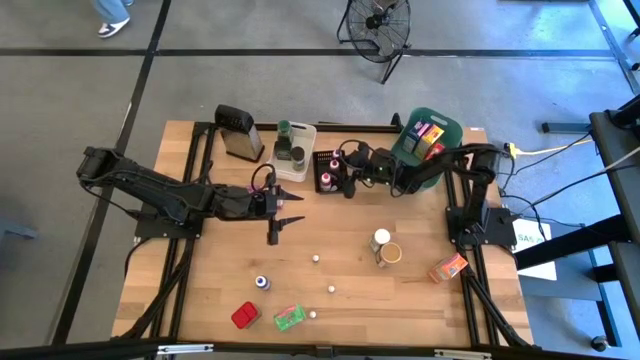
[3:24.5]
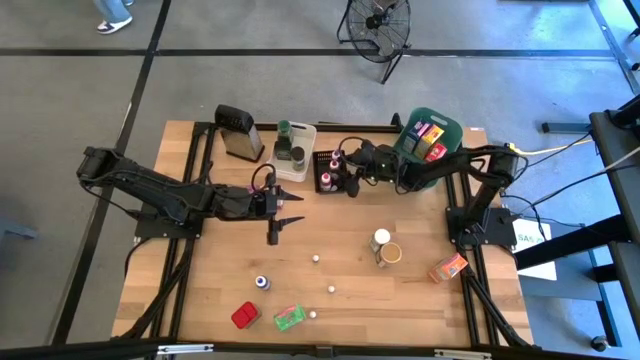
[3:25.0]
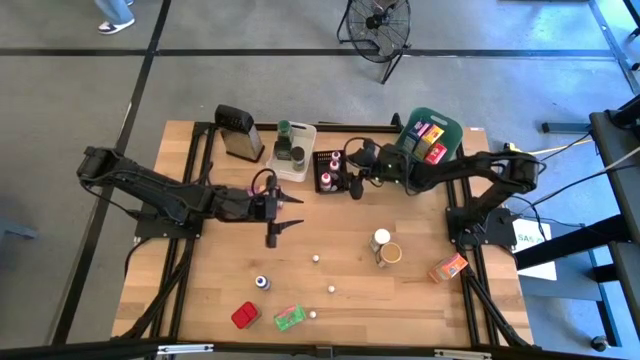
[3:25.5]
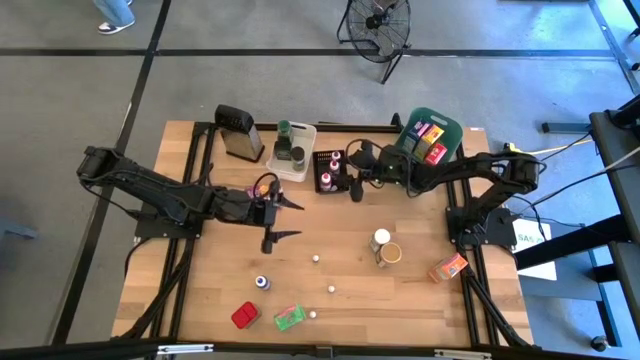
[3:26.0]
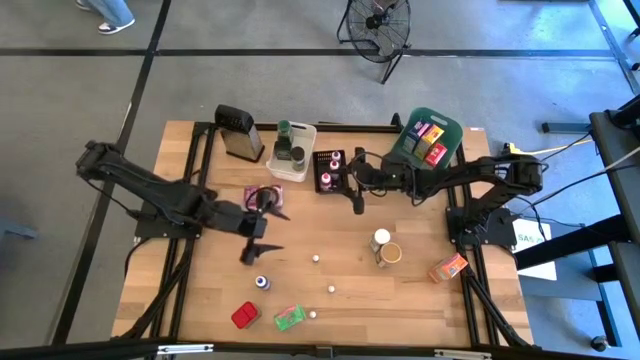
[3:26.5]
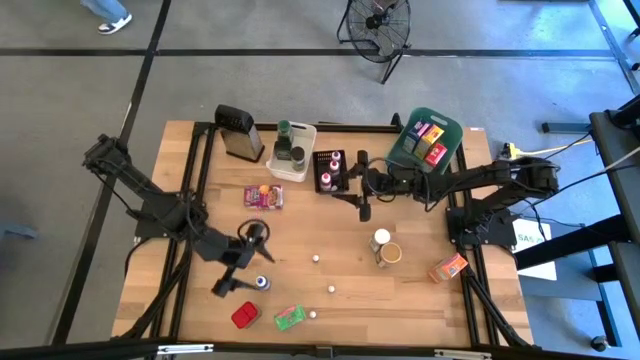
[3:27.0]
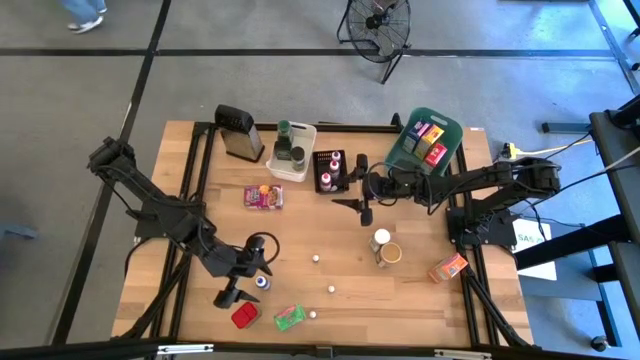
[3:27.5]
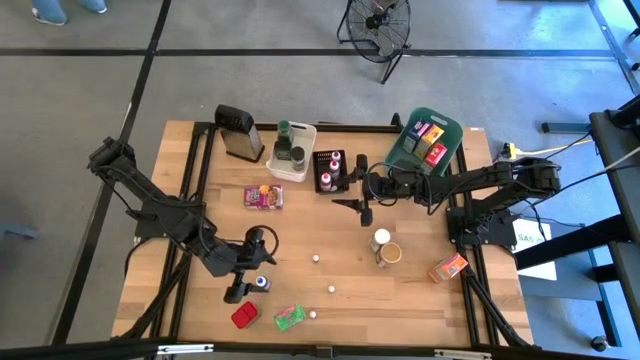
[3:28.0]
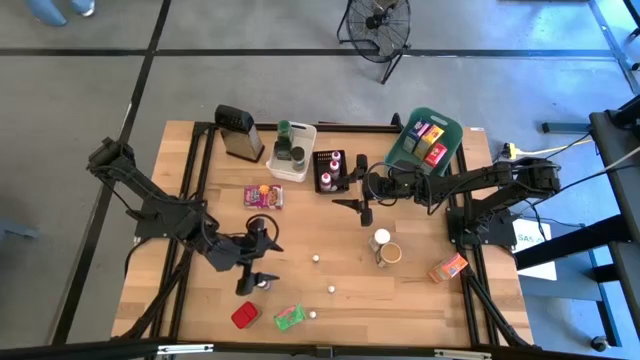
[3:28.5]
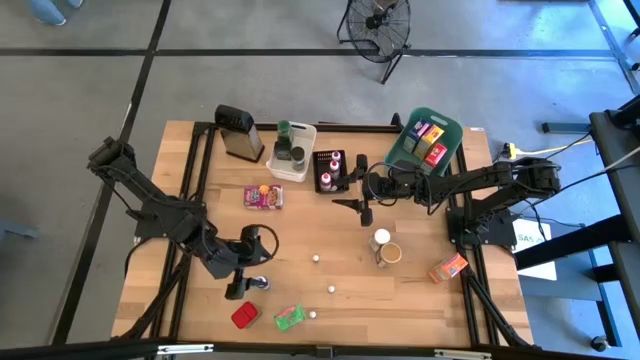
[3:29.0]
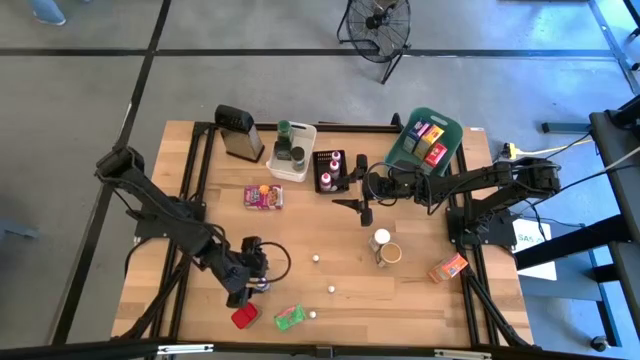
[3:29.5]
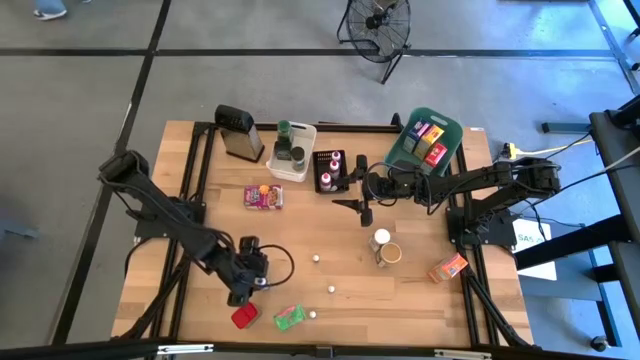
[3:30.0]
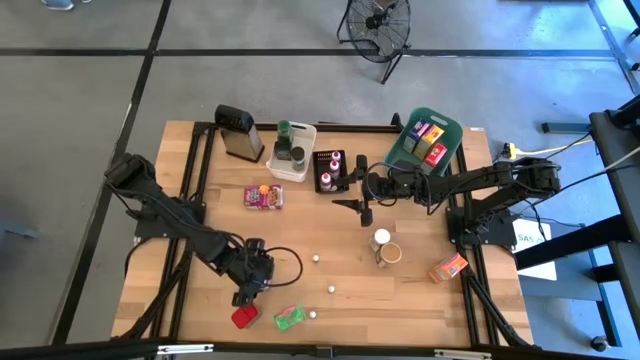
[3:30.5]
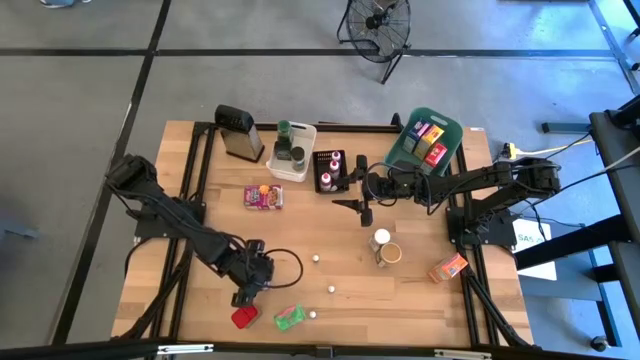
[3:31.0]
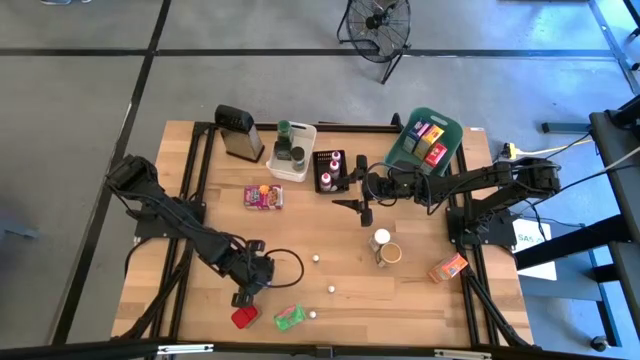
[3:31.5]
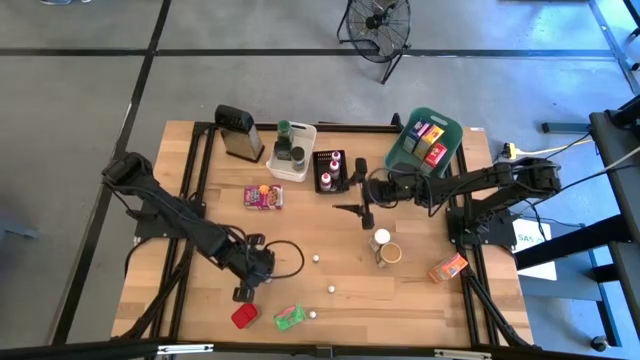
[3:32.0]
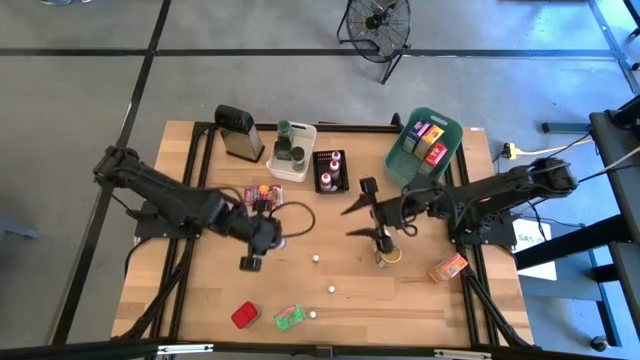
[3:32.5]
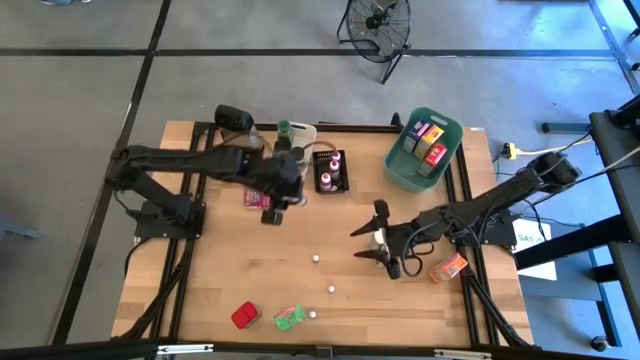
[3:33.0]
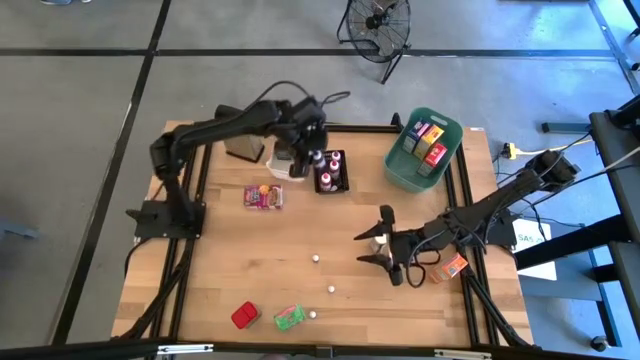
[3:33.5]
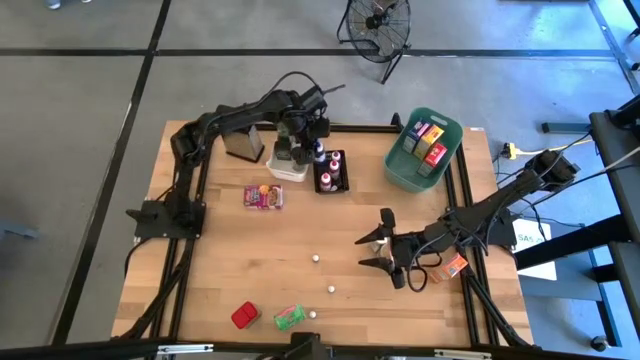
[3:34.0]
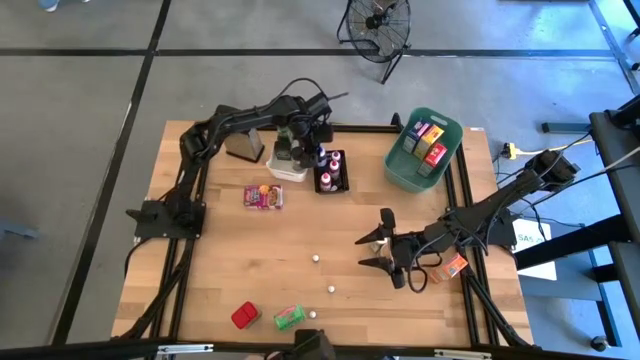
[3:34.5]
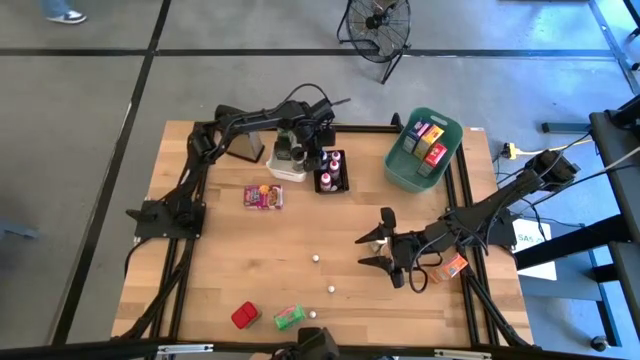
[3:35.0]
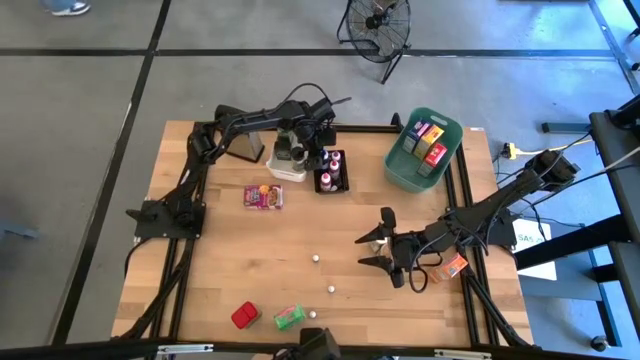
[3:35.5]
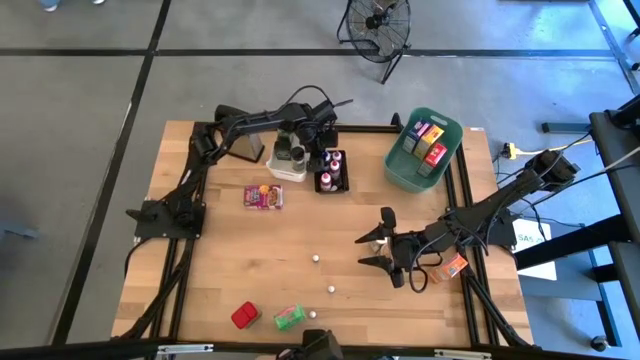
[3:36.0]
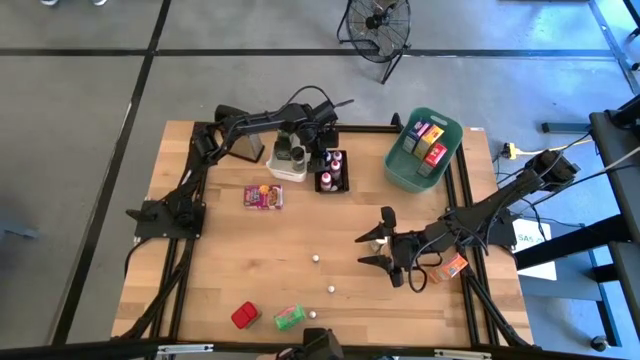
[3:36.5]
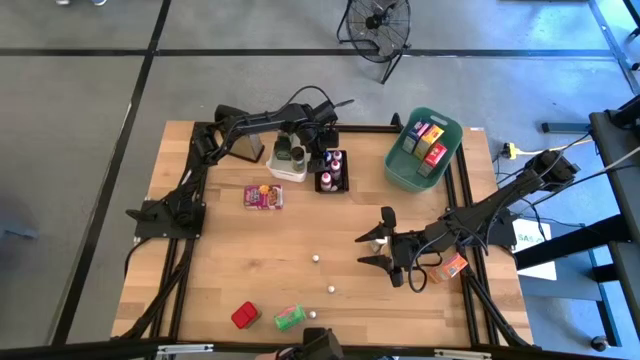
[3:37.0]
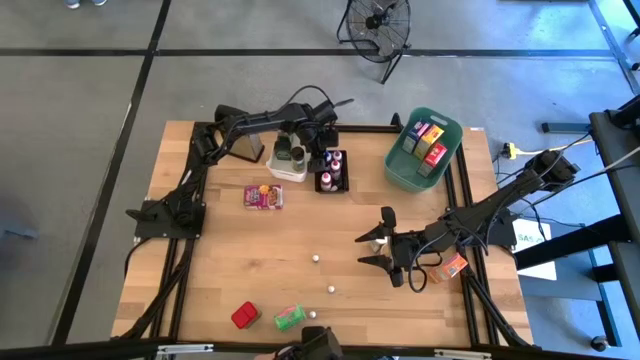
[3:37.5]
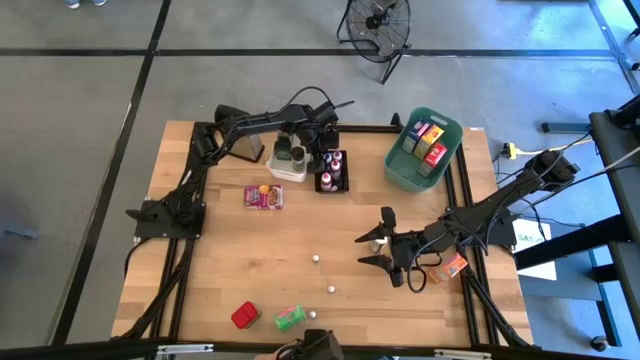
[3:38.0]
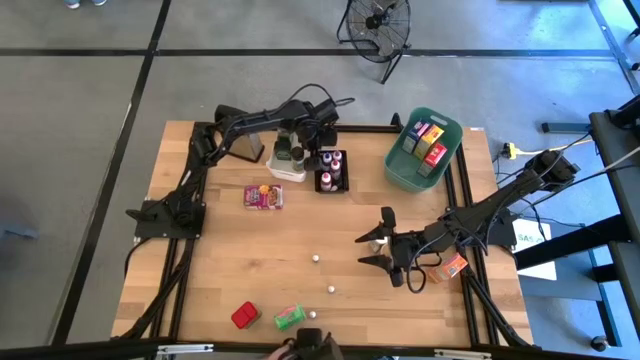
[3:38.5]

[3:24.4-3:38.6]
Task: Pick & Place Kitchen Items
Put the large blue food coloring bottle into the bin

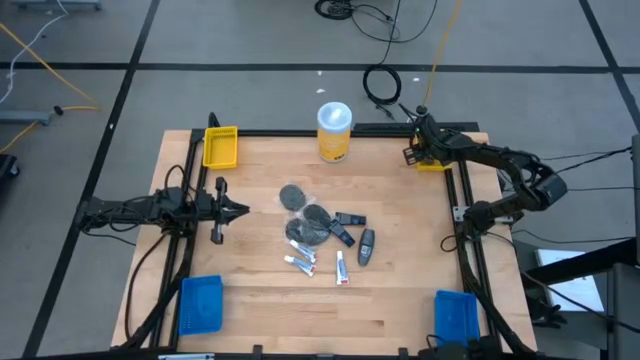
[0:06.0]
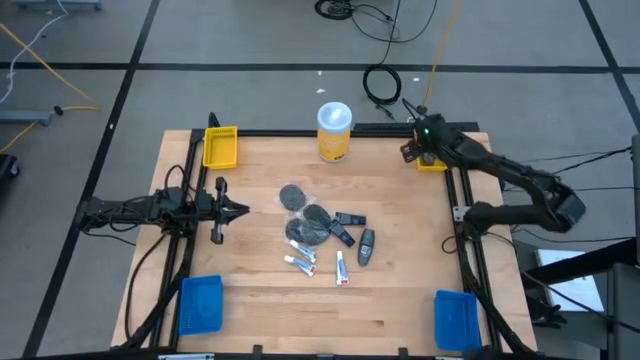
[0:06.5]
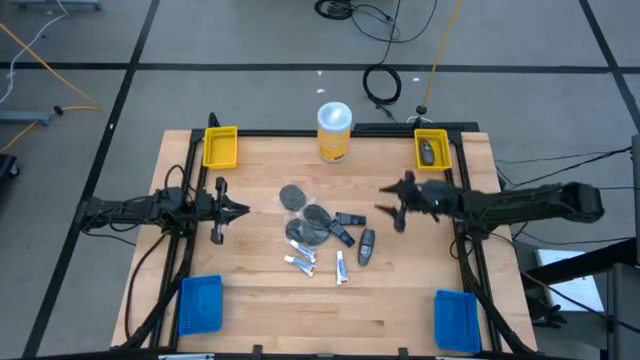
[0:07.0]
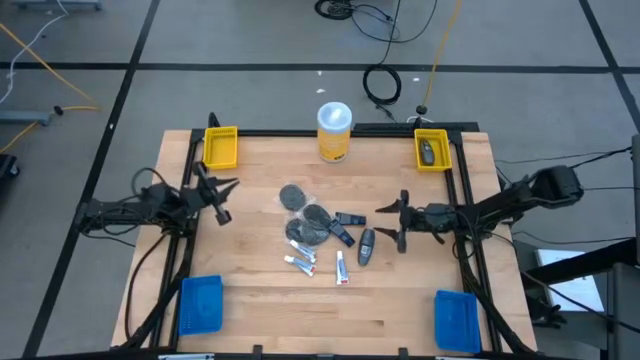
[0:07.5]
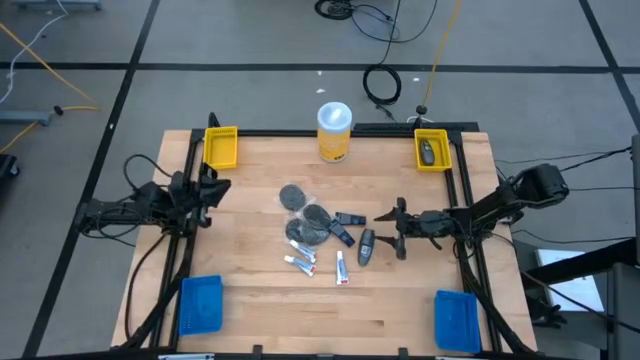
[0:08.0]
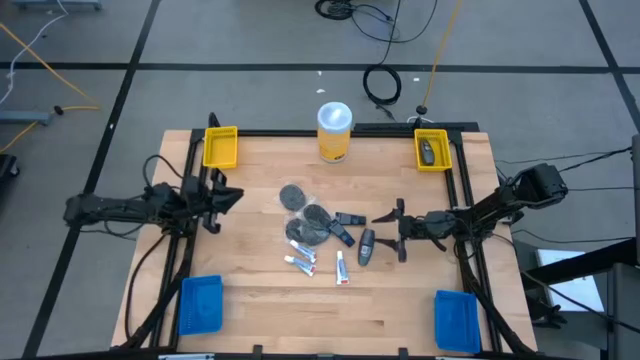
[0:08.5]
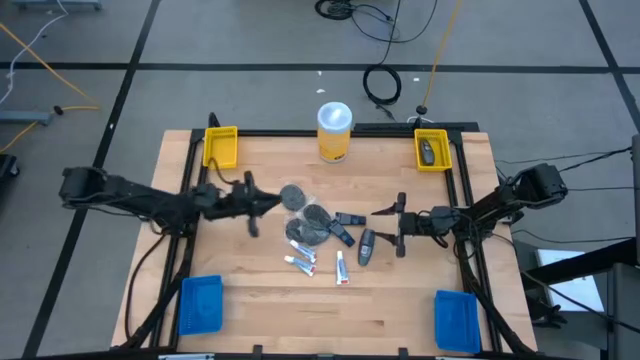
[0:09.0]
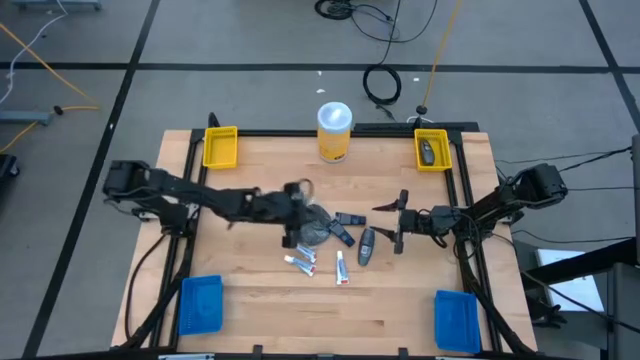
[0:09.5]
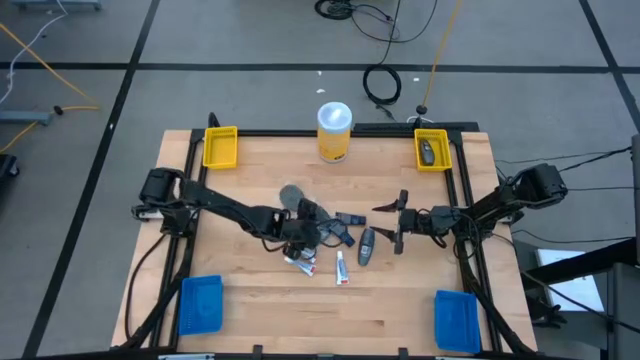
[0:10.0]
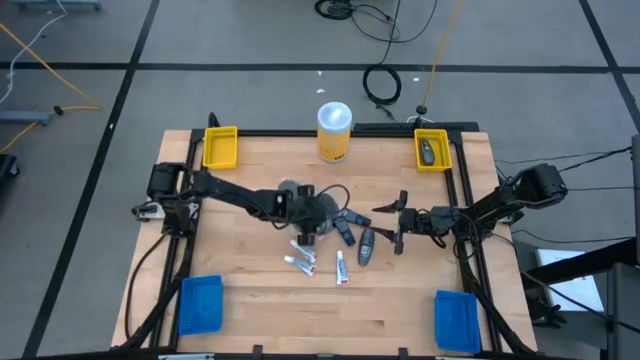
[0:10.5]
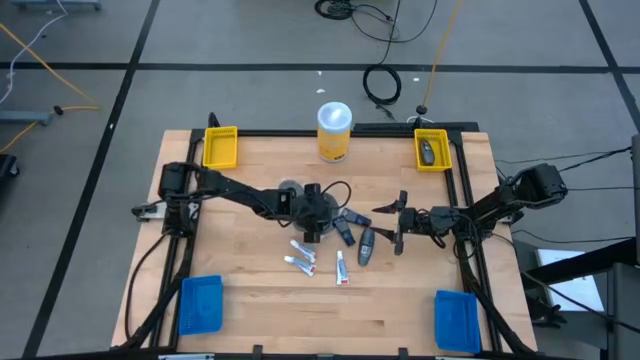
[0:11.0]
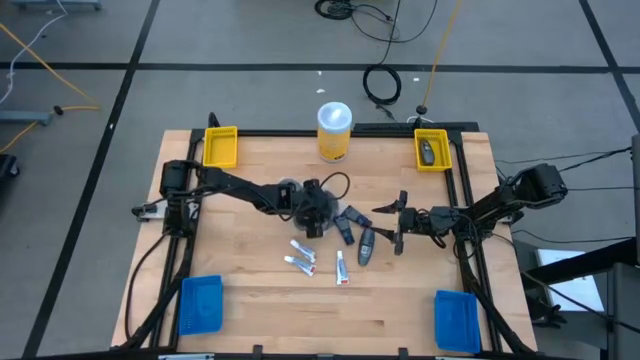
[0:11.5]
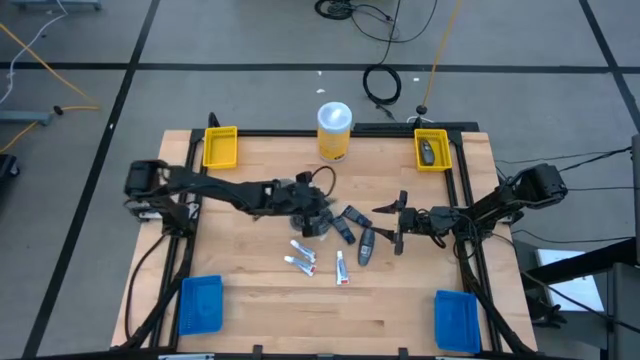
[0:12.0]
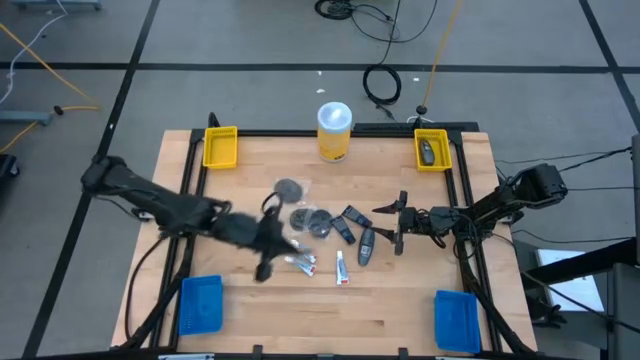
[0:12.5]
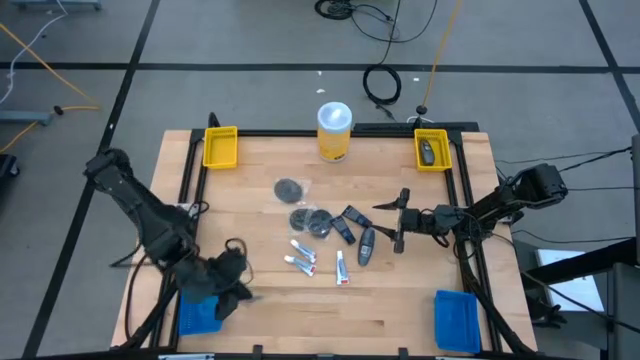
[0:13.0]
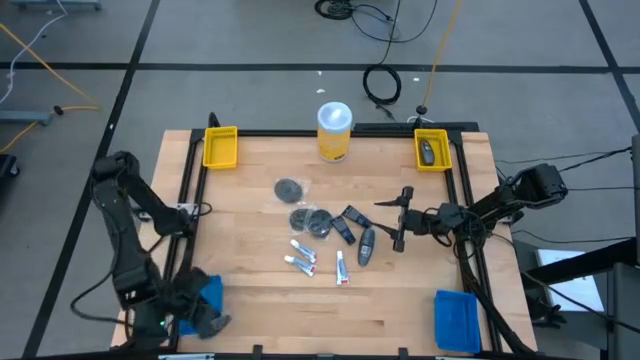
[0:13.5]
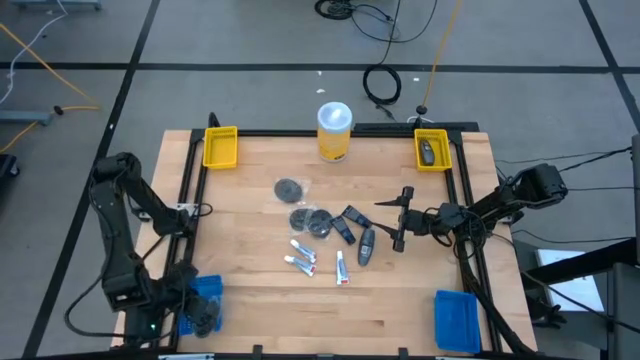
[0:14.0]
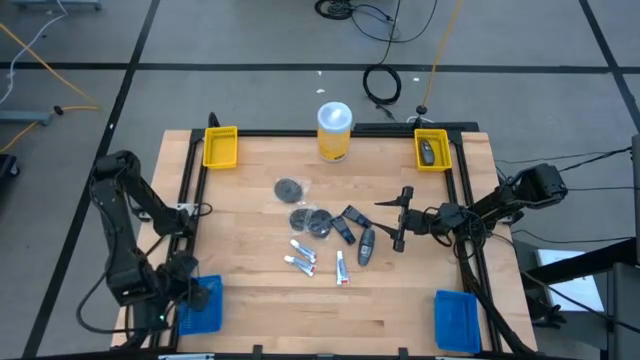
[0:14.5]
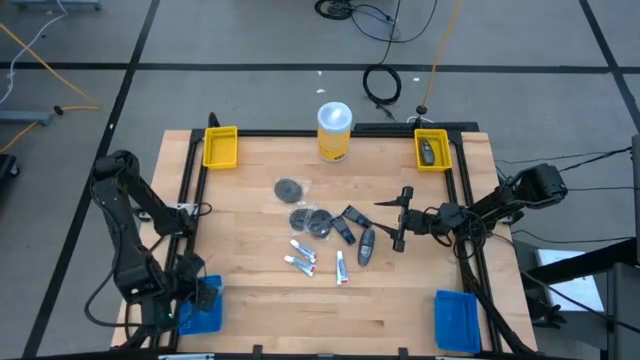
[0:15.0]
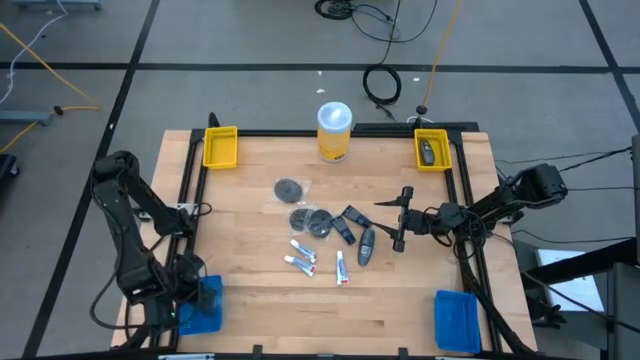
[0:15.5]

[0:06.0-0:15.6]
Task: Pick & Place Travel size toiletries
Put the black hairbrush into the left blue bin
